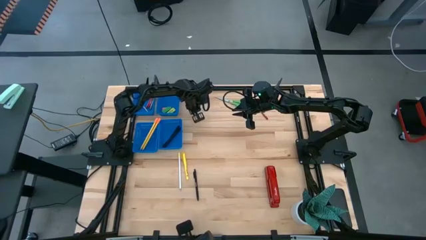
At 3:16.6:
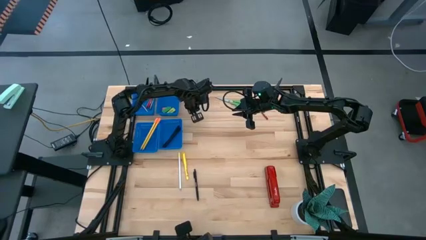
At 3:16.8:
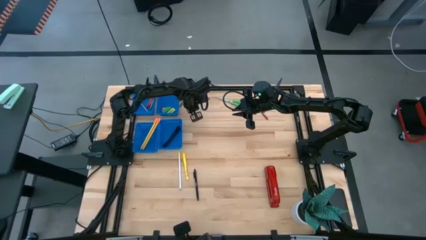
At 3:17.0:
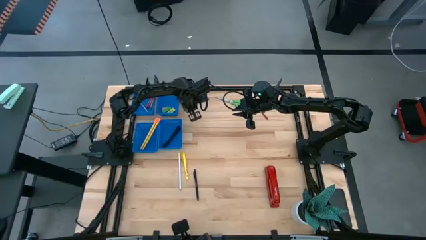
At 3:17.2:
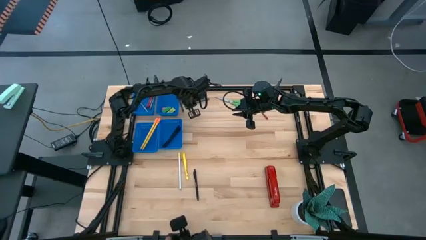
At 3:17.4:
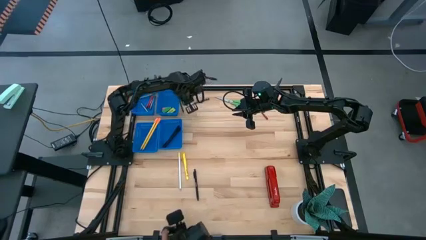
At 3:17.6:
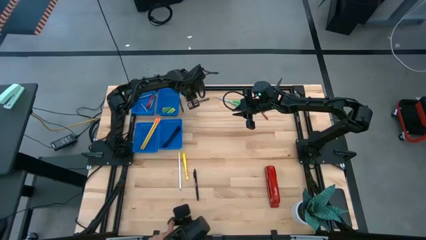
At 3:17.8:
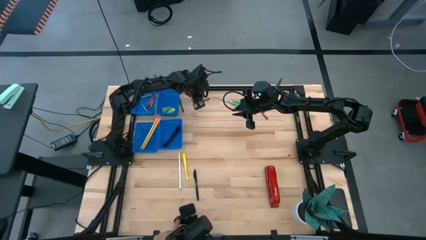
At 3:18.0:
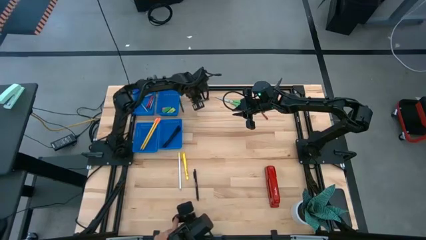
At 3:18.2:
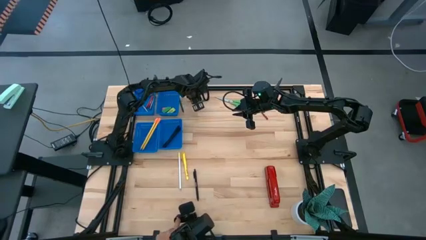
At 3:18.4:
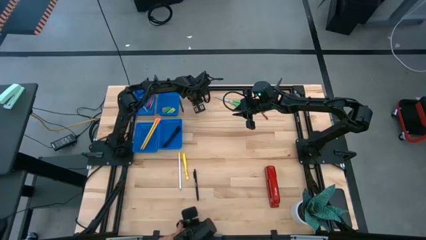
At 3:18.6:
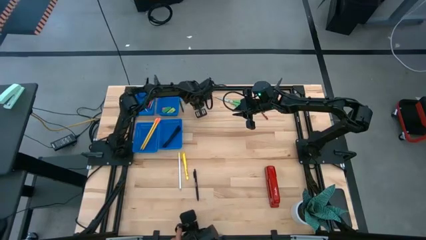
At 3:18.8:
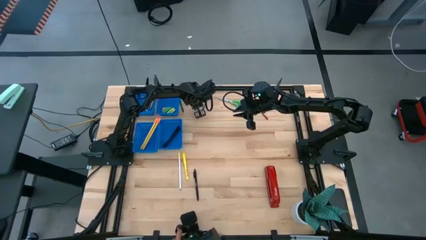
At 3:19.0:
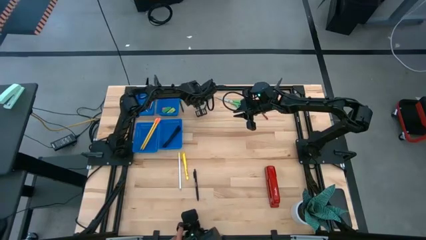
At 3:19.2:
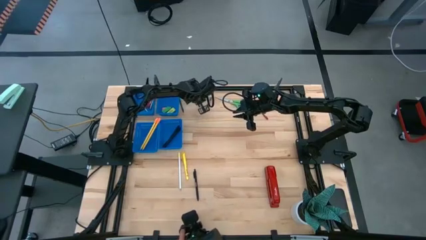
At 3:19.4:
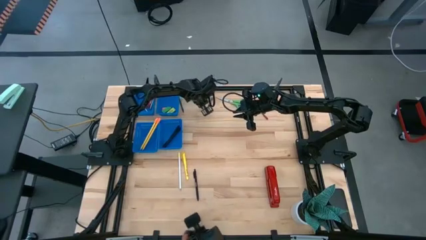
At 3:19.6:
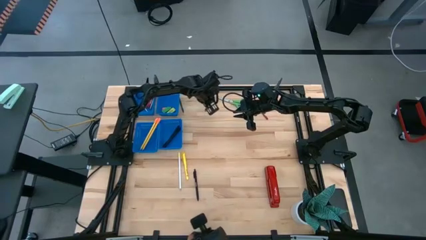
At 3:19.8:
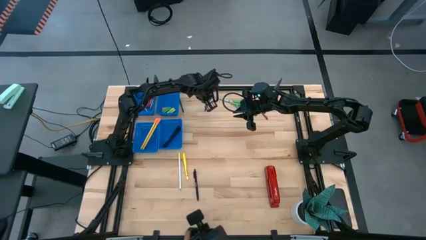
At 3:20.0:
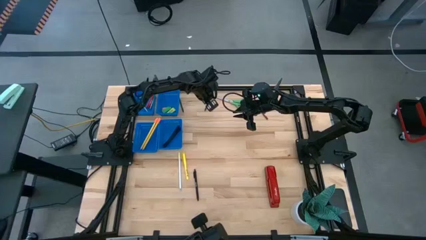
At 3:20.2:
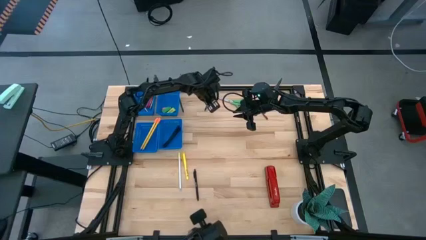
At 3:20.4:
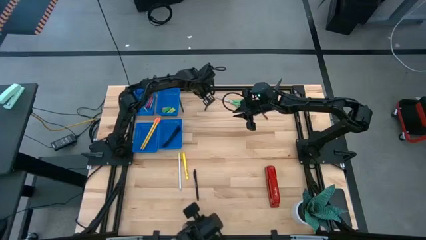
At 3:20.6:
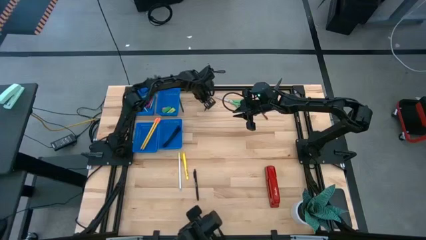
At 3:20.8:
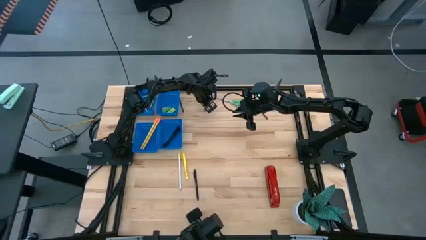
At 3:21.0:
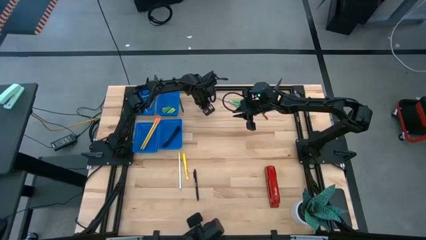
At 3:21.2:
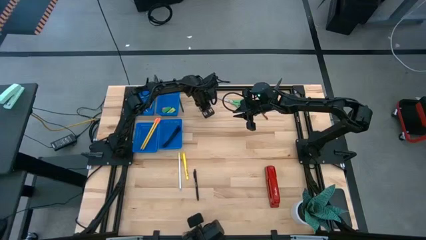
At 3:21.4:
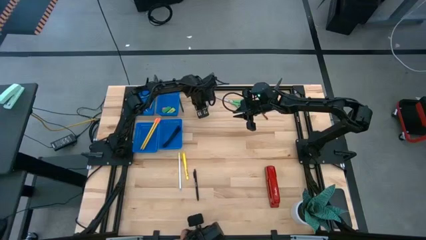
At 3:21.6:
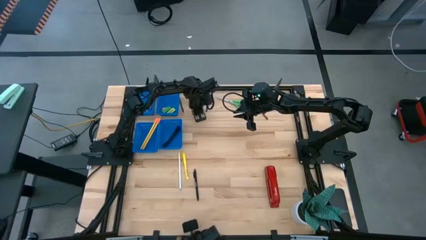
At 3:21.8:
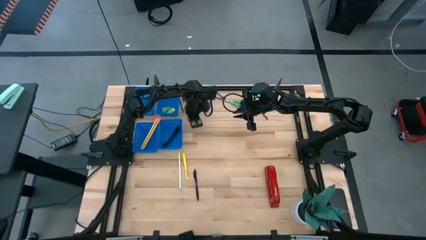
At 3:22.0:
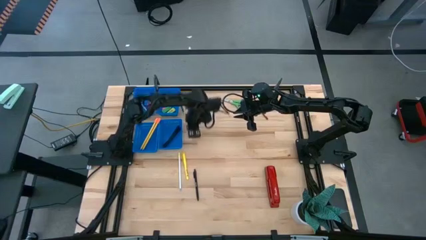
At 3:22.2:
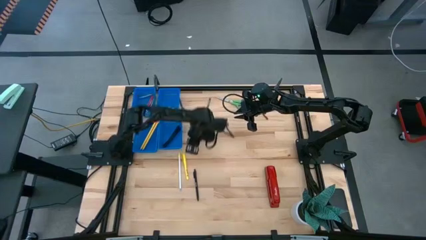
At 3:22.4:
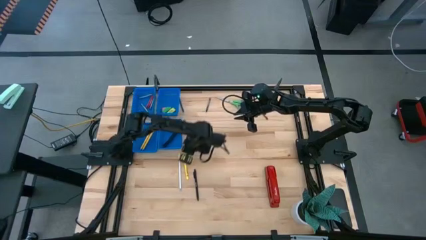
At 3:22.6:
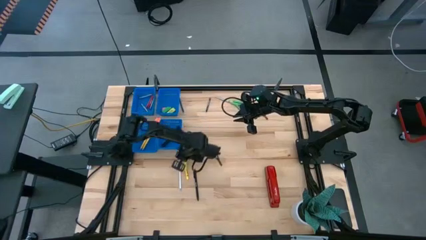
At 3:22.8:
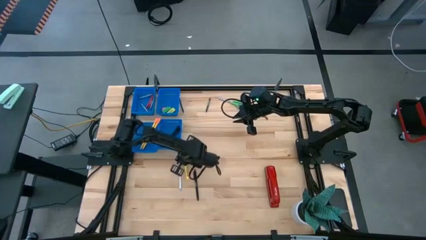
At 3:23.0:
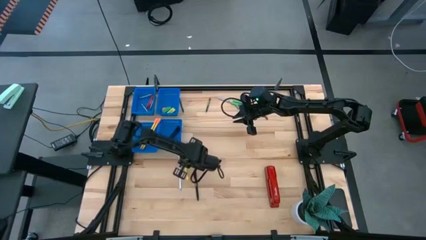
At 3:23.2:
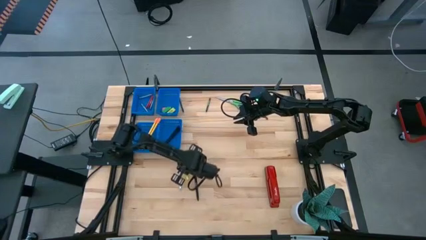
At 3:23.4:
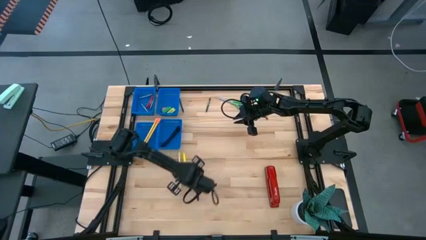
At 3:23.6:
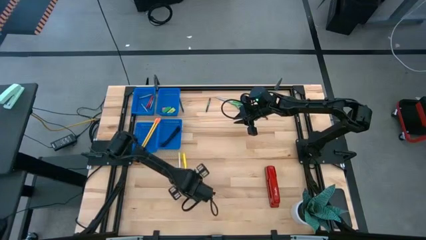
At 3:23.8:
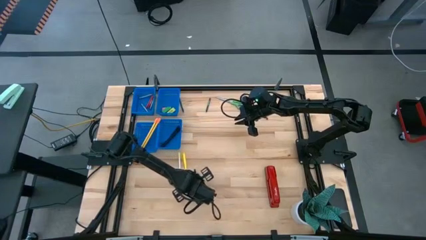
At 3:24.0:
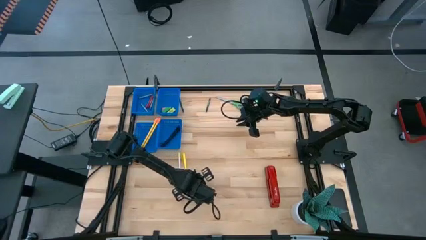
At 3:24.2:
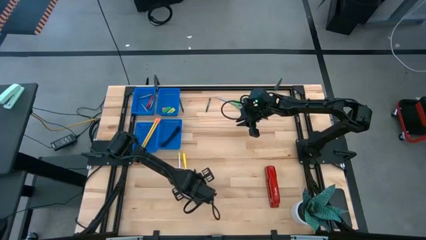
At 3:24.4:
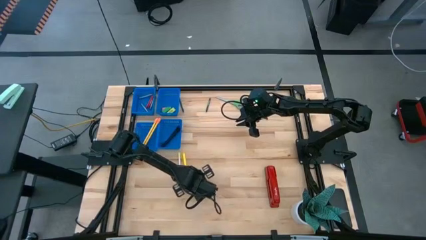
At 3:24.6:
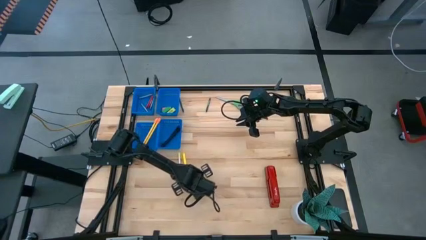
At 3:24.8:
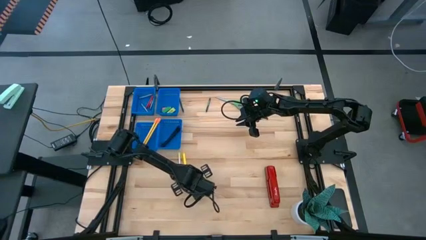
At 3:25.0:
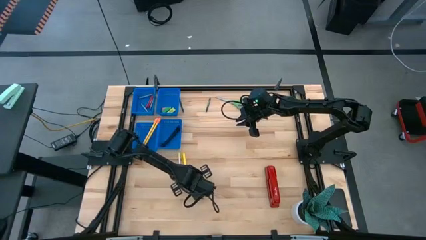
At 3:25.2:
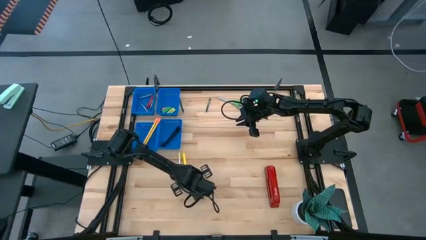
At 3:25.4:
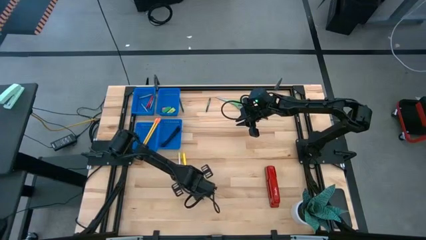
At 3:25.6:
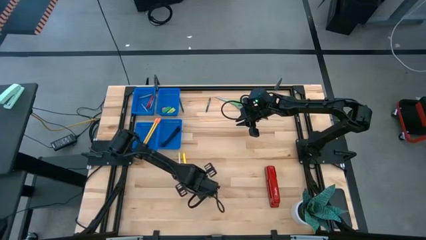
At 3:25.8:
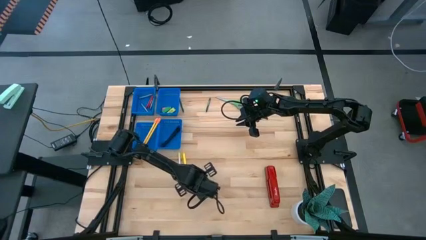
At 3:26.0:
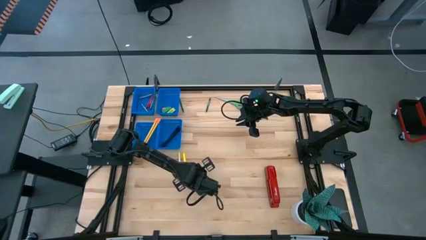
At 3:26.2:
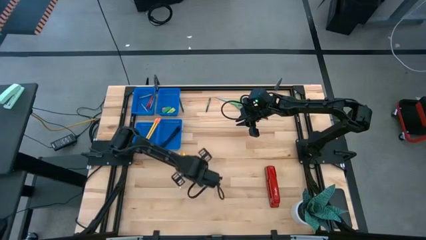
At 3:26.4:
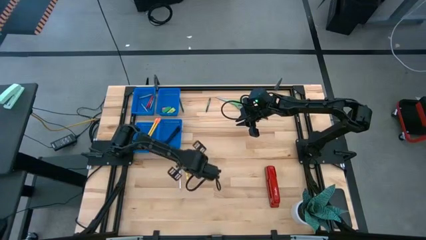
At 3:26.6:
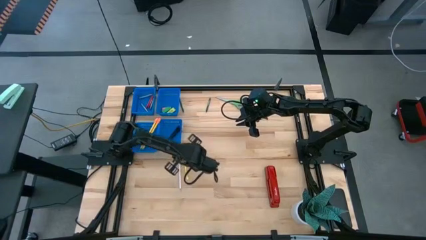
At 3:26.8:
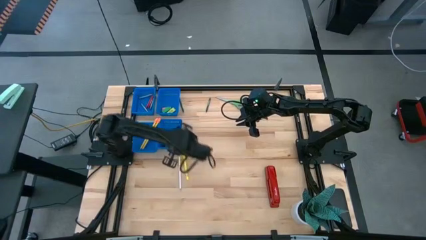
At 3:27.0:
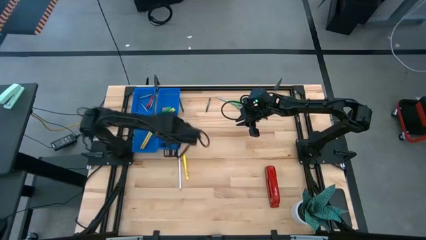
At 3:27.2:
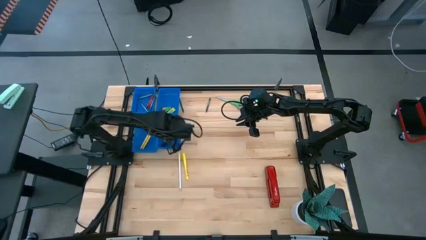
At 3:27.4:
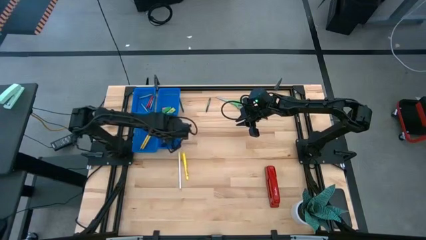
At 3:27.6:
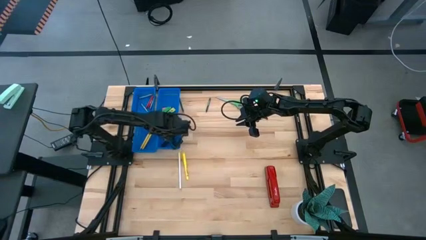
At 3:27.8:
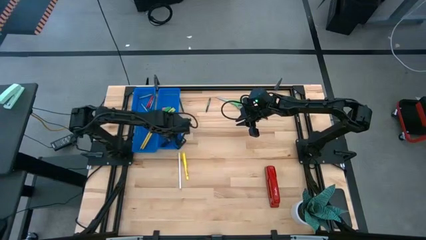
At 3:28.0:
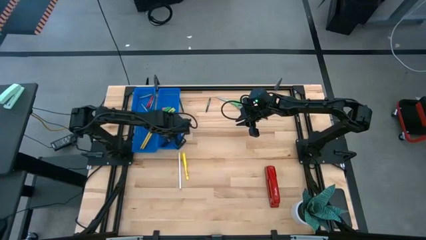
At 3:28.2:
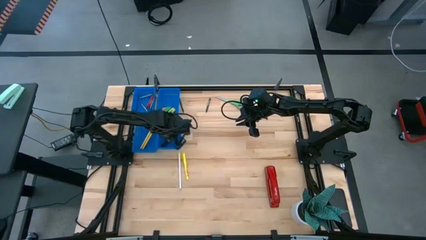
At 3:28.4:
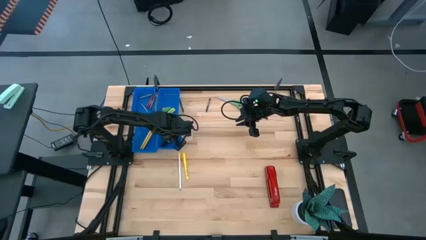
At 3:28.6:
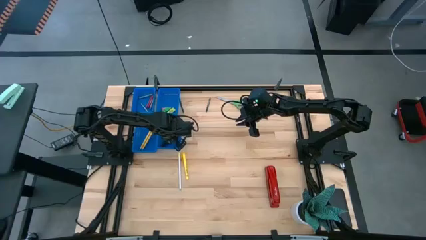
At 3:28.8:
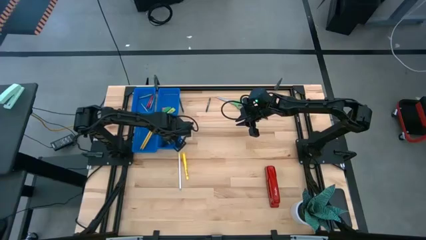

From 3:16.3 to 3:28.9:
Task: Sort crayons/erasers/pens/pencils in bins
Put the black pen into the bottom right blue bin

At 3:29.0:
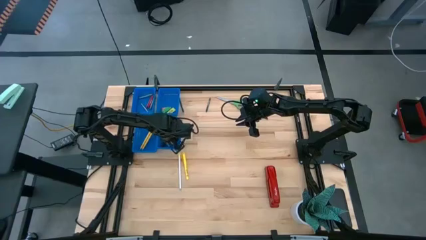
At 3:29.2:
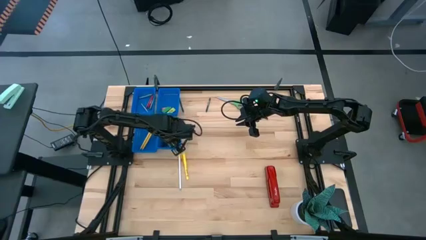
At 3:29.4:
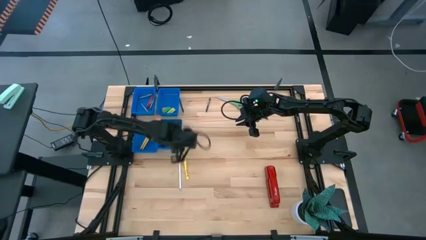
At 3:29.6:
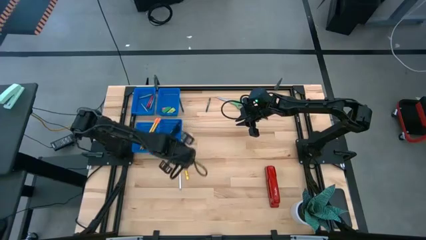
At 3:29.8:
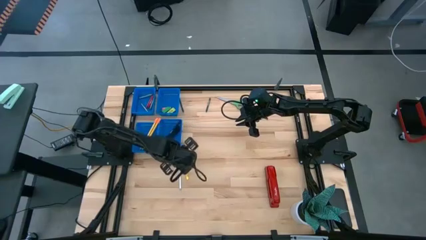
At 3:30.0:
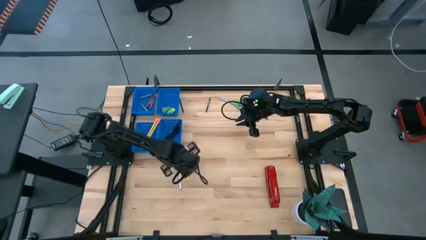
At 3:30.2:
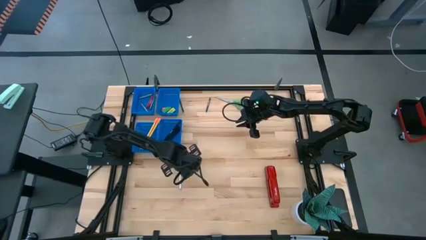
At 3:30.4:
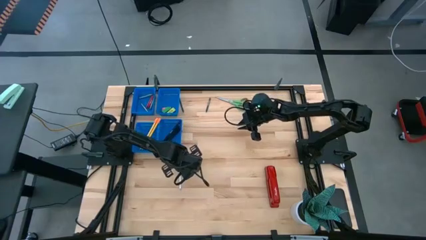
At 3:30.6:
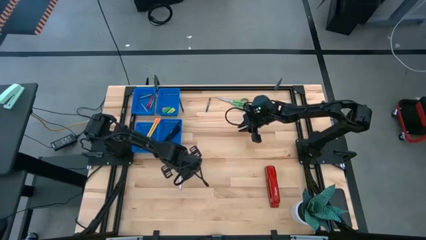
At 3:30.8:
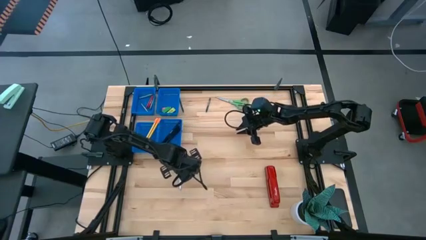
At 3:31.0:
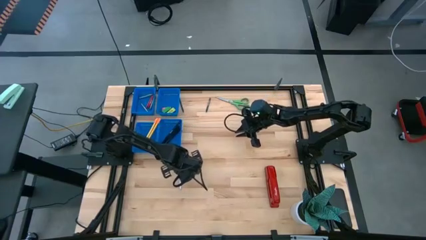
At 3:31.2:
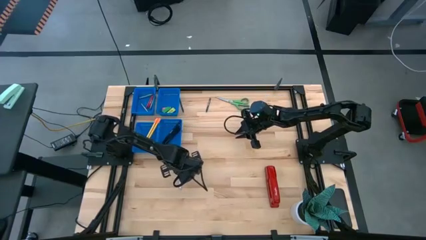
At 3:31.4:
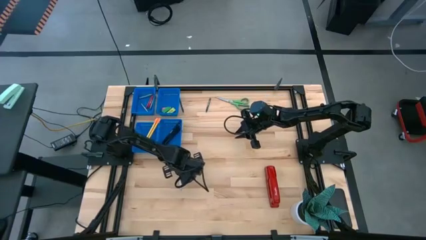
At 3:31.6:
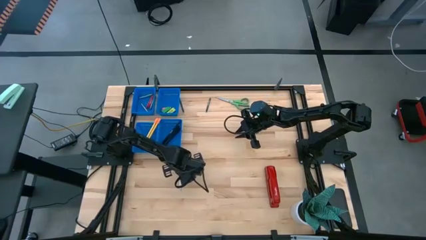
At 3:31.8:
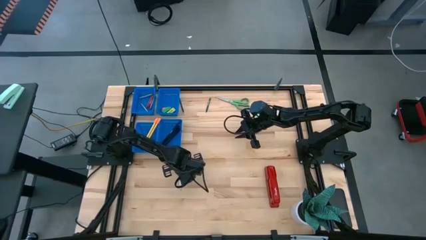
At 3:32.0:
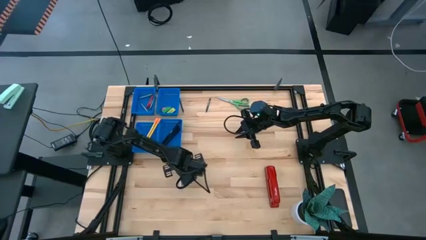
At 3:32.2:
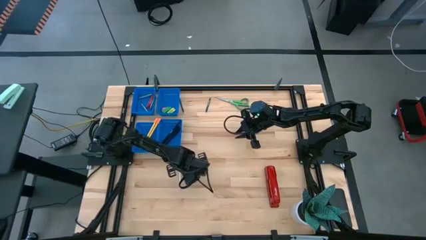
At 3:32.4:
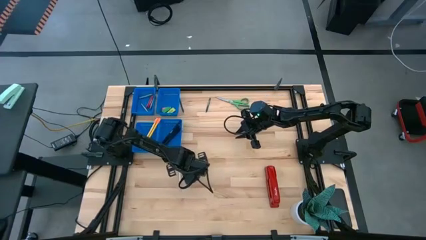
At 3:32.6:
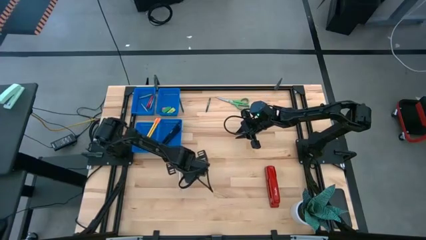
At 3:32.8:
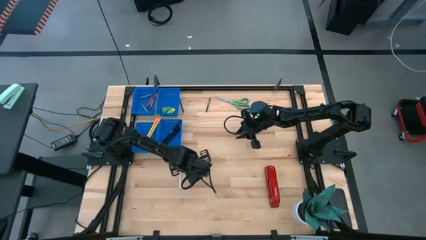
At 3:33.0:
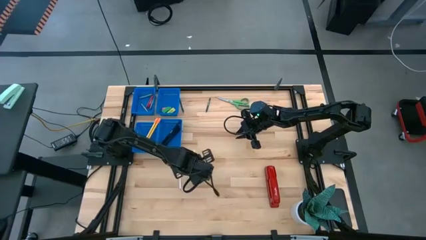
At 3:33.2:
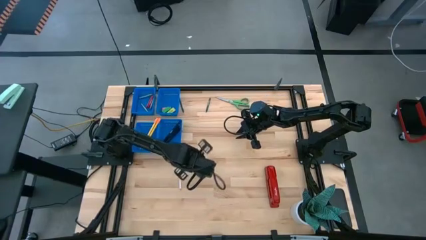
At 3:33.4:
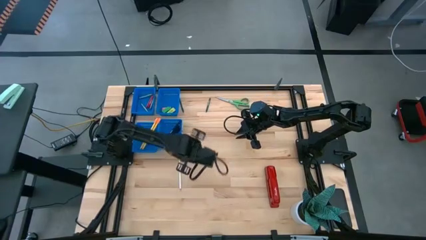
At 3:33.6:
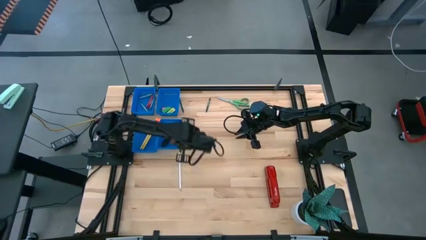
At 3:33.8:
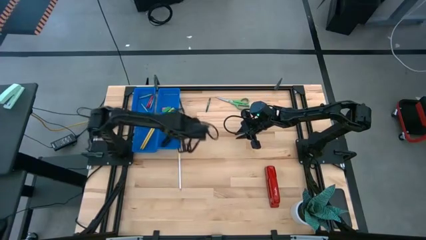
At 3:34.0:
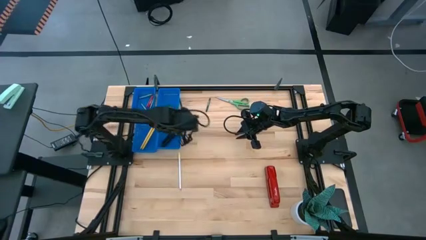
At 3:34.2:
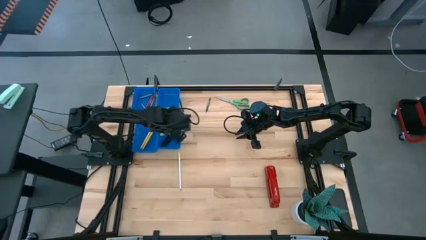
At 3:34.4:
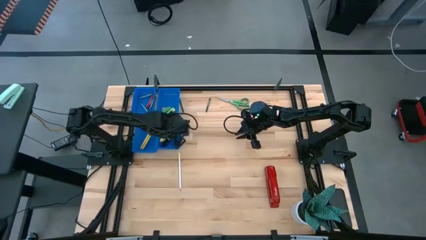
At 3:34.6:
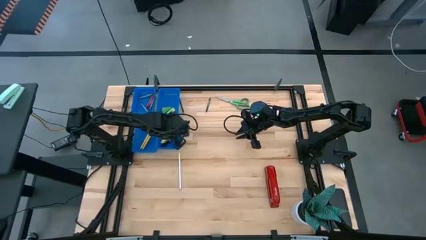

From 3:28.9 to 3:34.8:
Put the yellow pen into the bottom right blue bin
